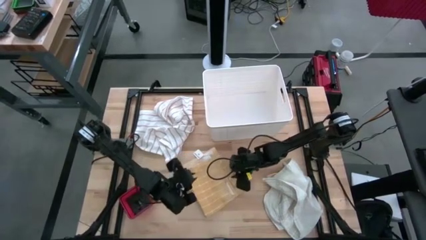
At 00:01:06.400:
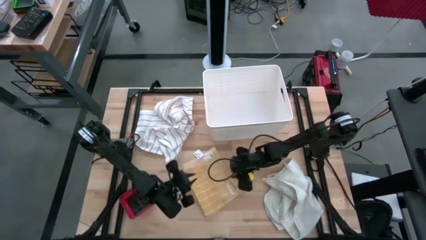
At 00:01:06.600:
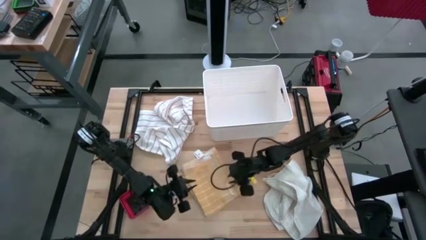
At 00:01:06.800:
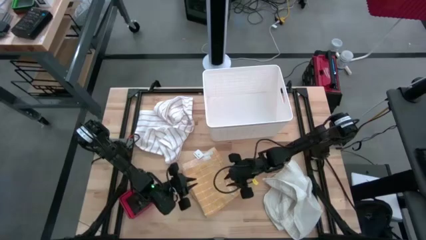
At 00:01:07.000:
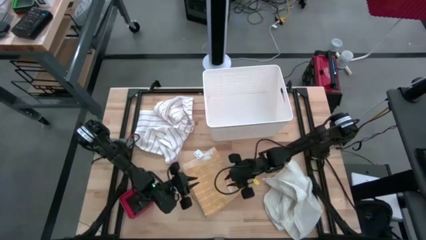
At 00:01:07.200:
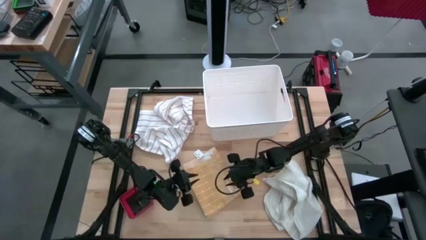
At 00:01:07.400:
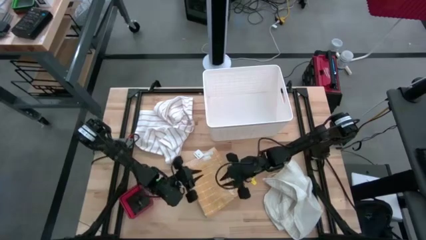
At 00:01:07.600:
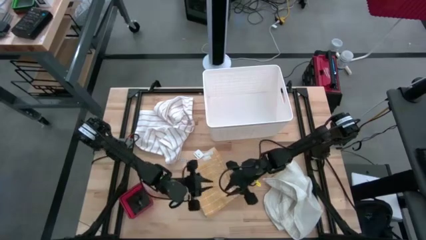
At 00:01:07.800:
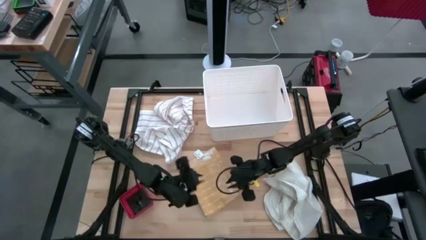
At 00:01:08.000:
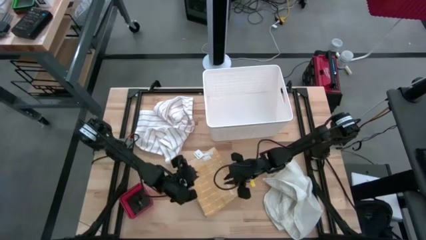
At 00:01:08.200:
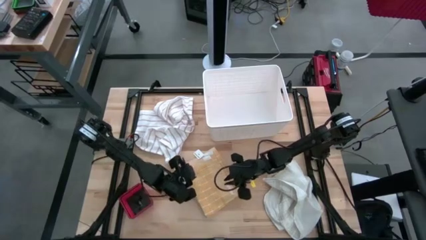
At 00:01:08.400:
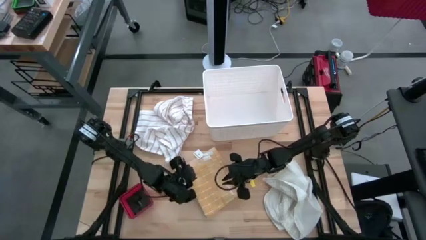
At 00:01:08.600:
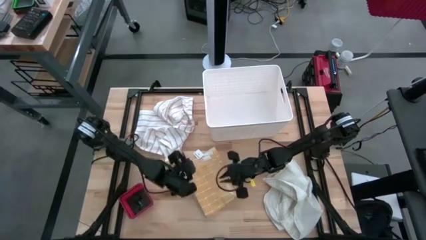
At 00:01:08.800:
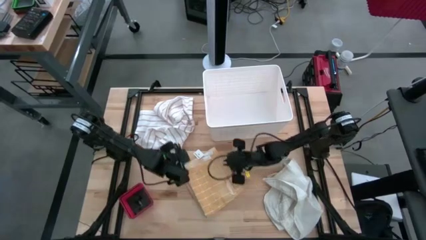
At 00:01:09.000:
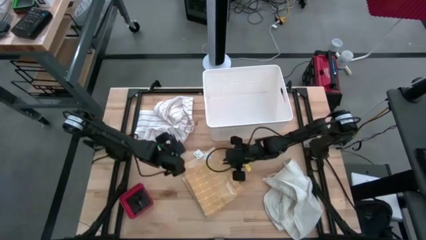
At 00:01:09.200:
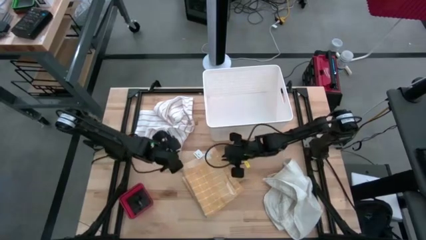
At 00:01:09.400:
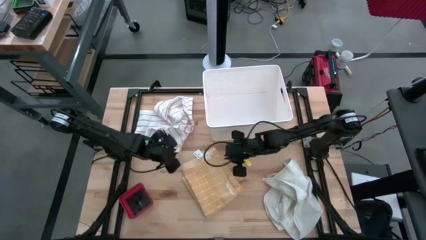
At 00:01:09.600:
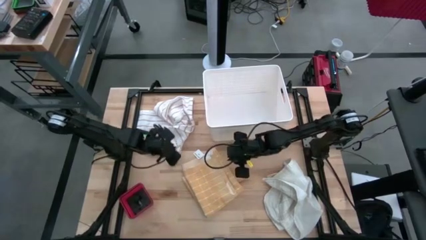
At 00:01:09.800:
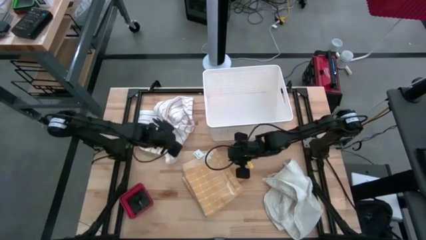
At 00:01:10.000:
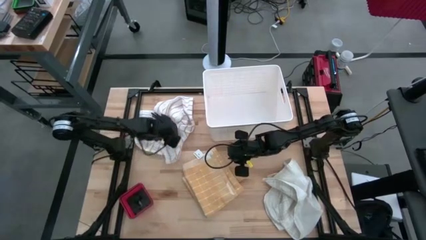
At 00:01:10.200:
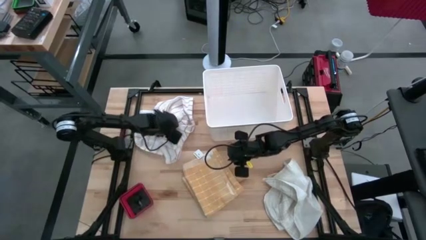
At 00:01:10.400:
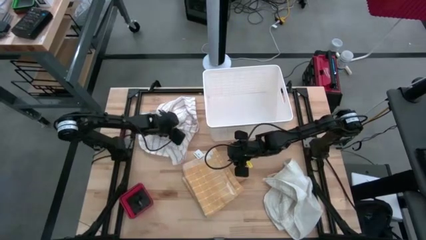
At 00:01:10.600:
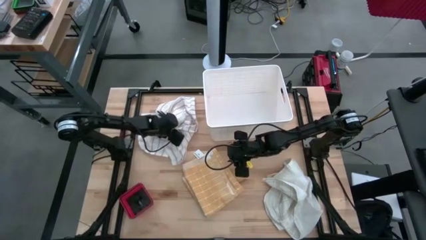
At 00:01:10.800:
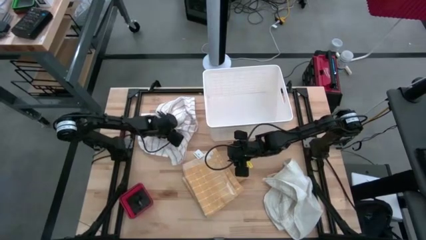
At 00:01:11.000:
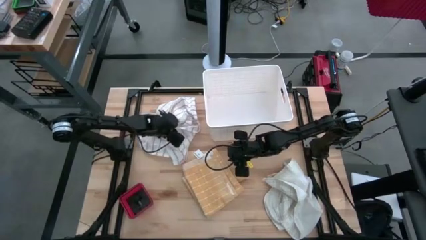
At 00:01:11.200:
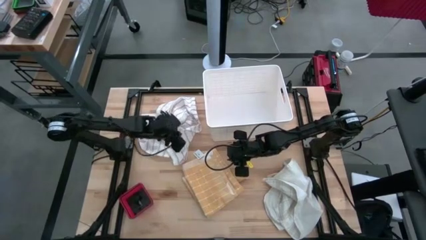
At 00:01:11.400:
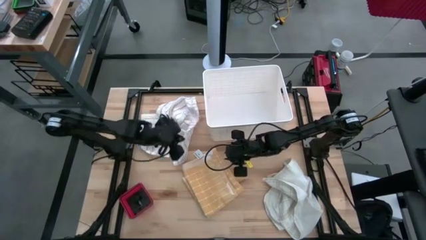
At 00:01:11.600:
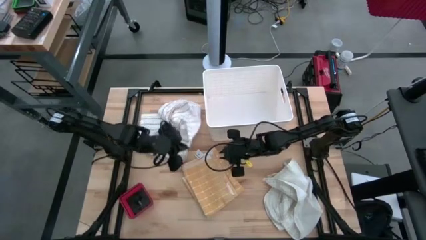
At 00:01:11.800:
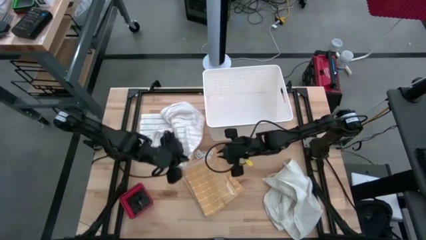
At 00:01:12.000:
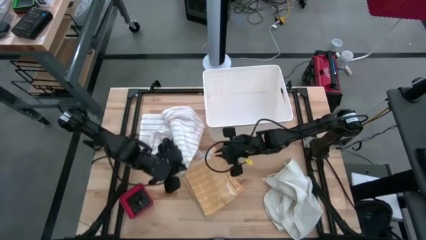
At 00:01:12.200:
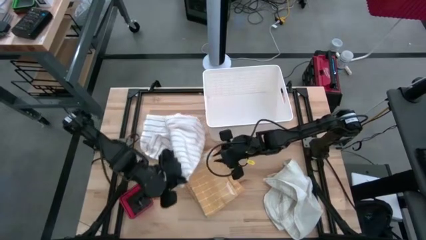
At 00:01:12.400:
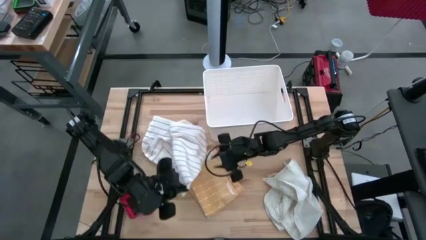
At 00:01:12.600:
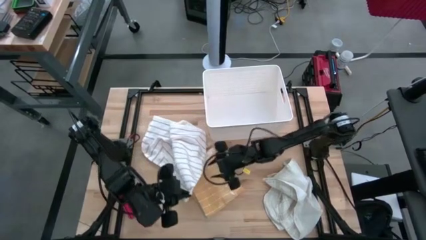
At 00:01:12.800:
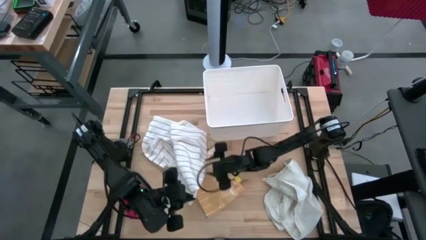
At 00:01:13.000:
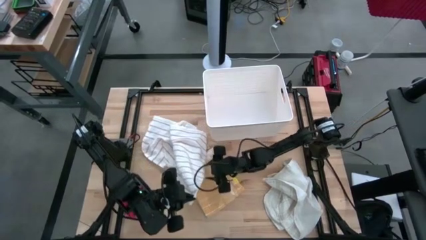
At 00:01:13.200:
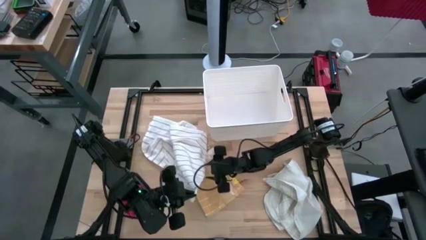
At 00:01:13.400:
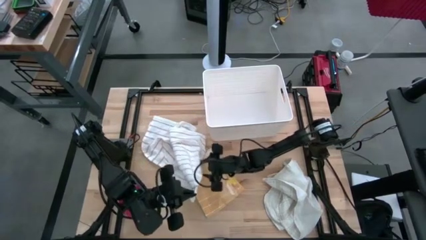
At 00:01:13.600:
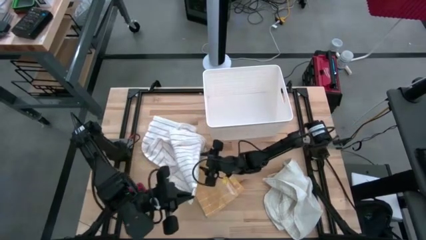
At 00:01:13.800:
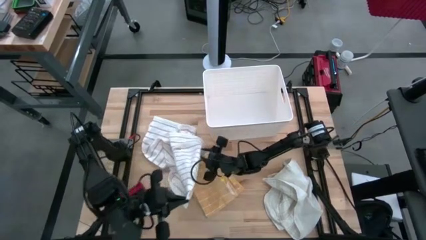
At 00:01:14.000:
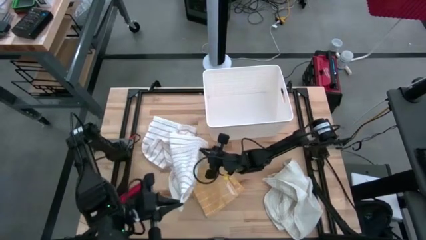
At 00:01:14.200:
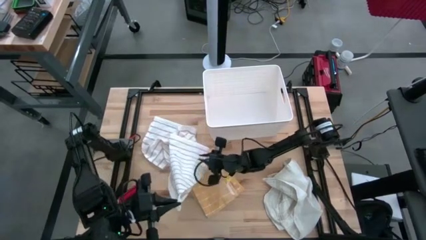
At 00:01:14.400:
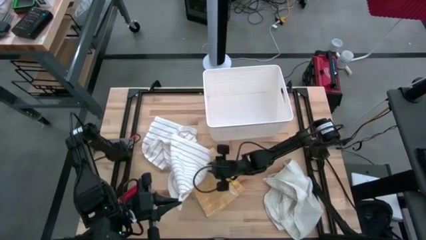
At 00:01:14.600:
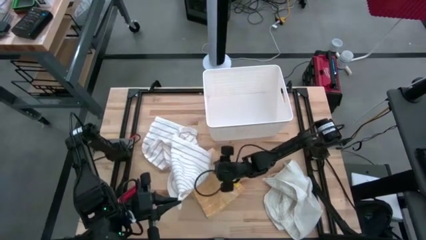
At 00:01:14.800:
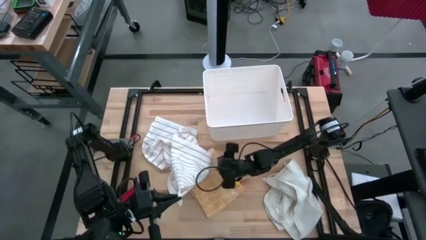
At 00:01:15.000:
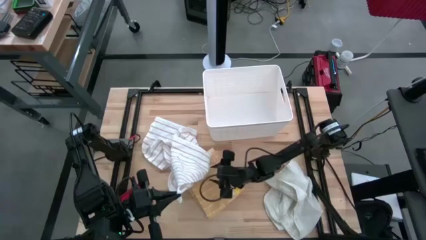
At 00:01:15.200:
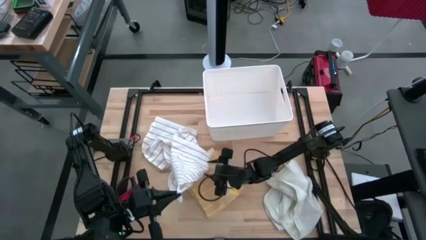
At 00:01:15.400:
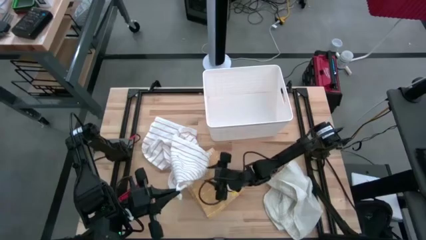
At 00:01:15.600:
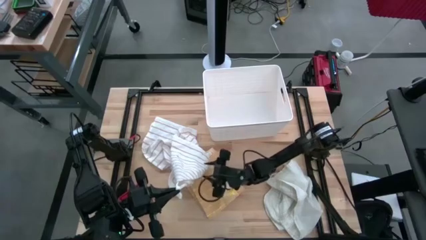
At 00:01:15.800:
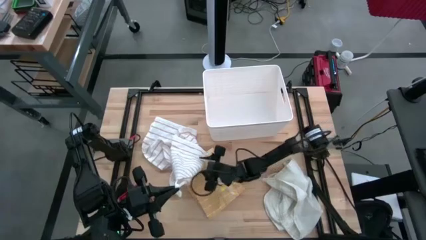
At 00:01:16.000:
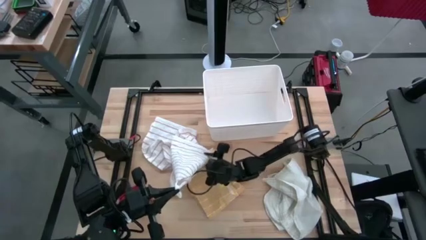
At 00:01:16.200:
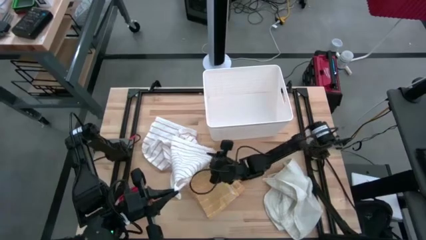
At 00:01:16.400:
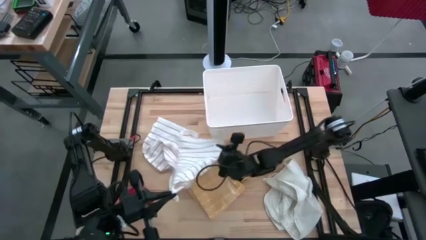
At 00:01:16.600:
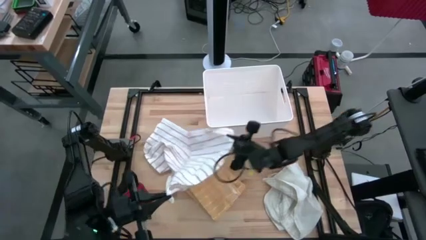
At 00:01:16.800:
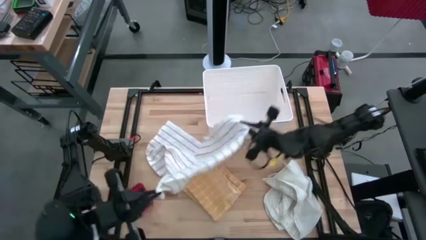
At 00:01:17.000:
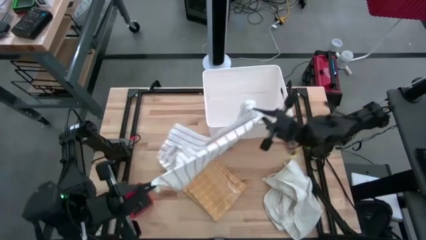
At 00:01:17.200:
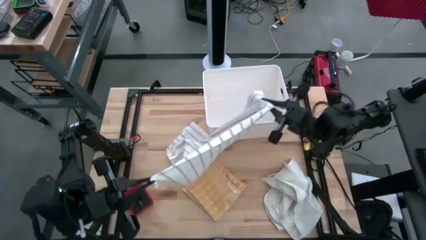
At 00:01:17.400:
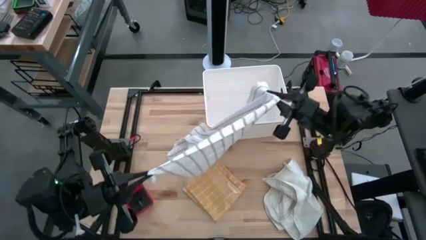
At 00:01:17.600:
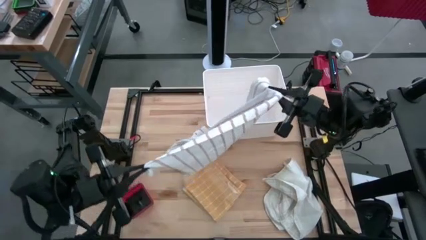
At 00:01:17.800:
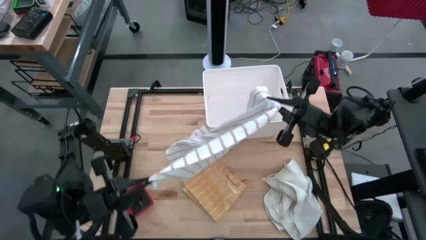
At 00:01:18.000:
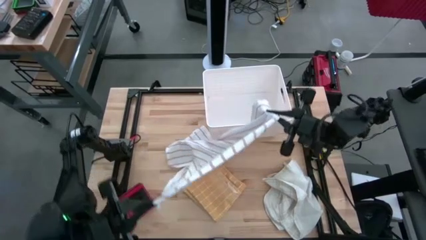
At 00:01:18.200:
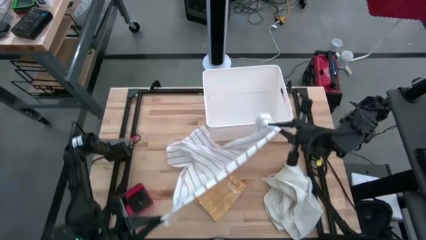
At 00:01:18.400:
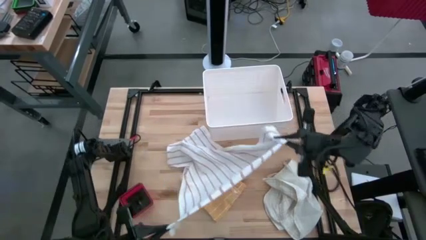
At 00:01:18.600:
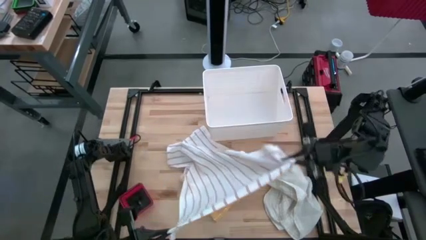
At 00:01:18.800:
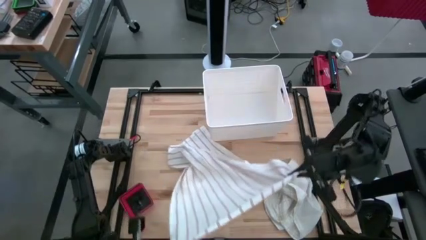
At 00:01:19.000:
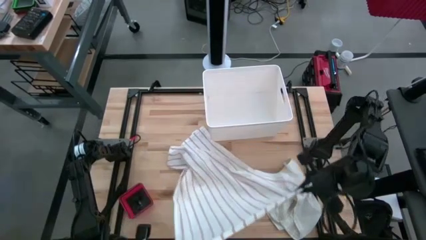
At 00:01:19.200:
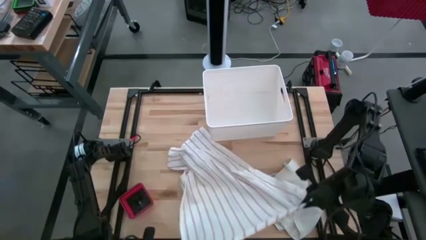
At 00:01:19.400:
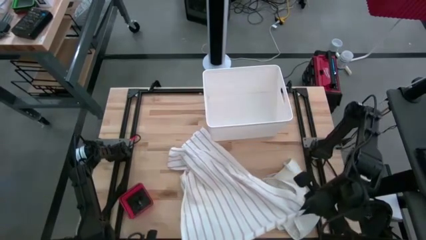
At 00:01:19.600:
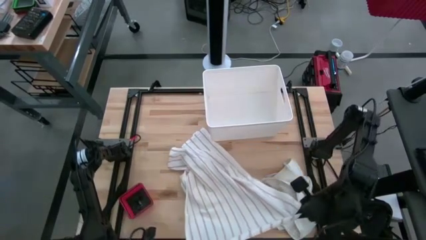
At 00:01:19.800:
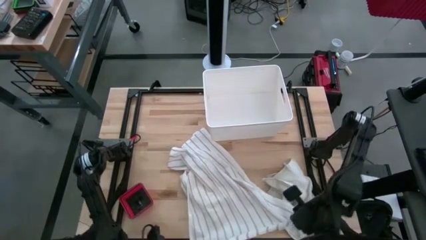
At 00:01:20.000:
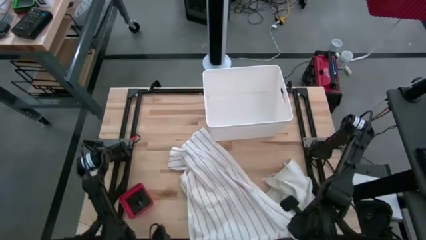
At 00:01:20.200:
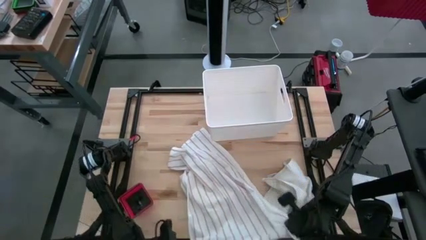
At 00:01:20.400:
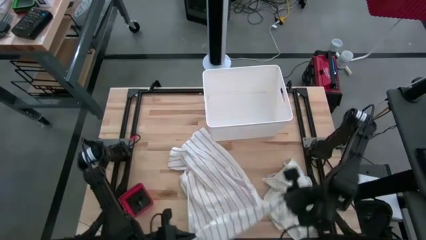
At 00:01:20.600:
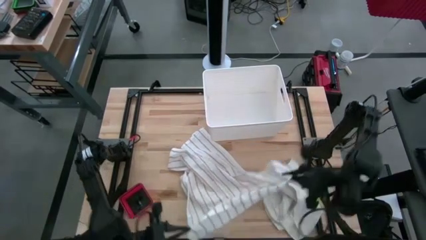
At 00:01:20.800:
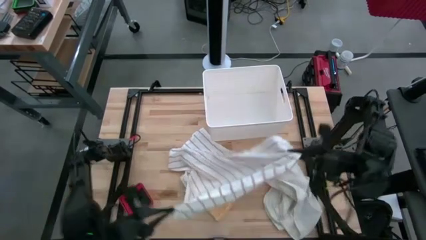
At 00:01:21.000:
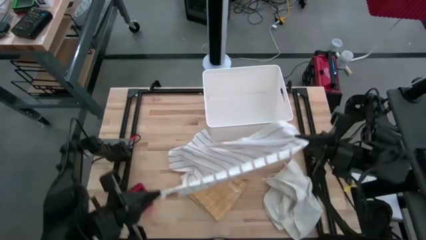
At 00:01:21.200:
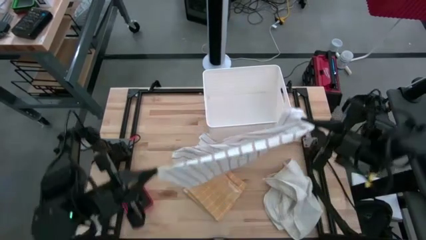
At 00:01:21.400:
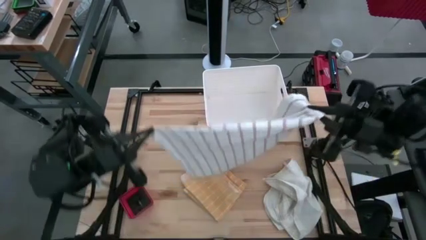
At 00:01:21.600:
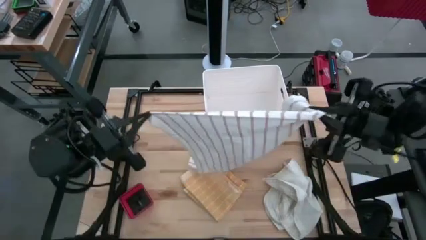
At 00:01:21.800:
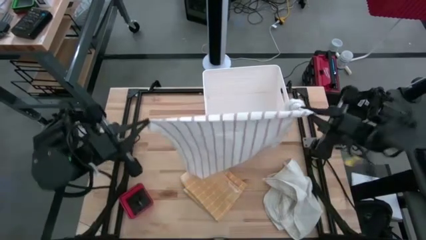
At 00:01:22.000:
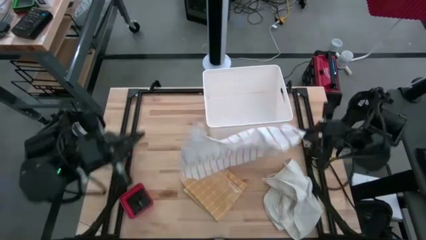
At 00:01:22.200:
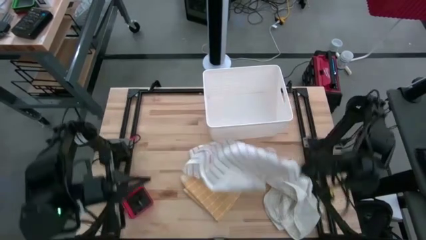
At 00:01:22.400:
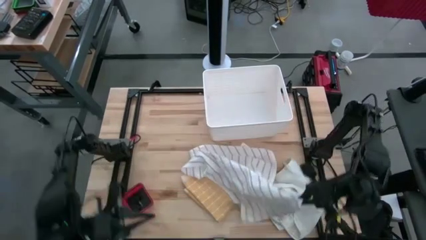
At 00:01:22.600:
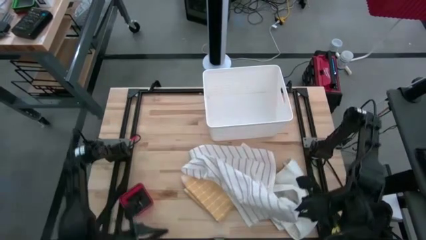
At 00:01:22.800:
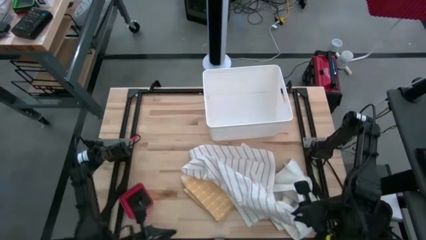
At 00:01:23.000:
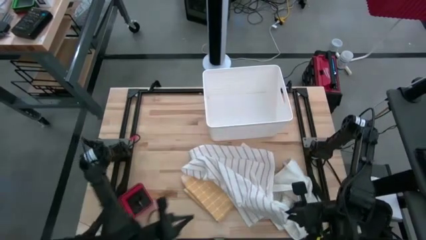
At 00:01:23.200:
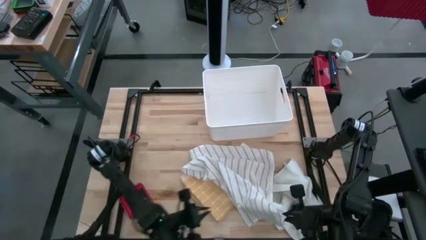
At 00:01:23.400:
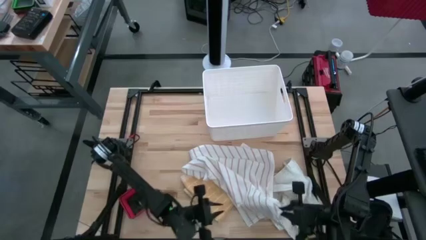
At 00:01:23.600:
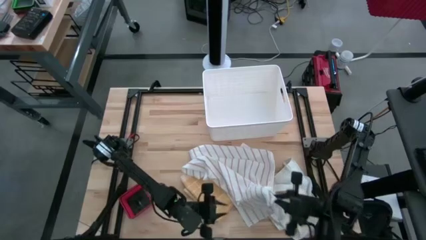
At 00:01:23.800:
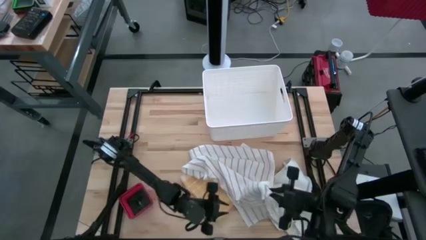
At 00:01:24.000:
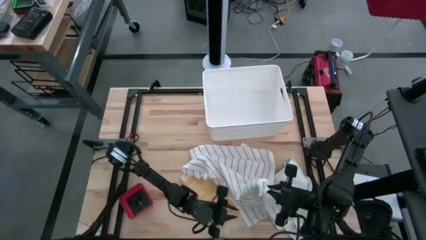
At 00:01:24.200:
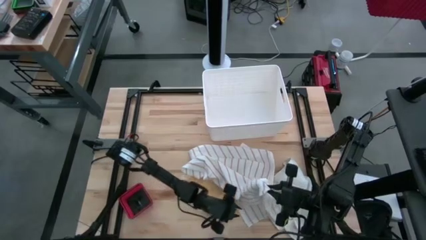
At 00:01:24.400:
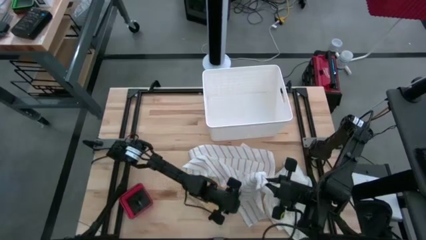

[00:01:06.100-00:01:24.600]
Task: Fold towel
Fold the brown patterned towel
